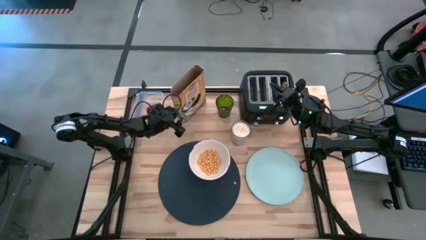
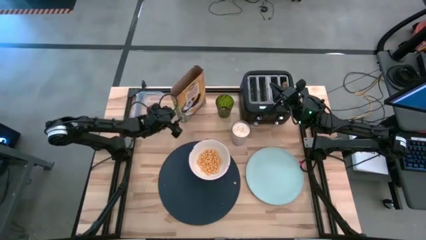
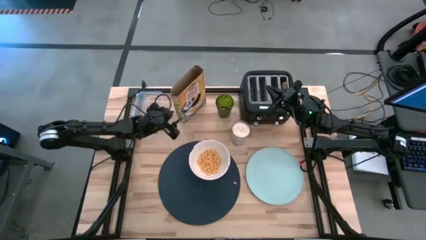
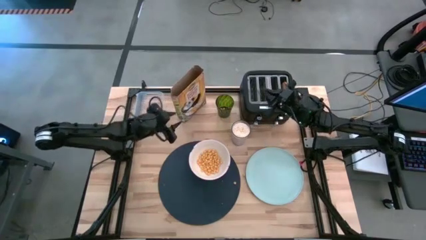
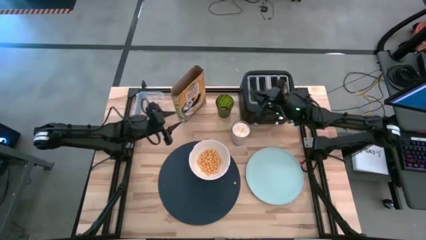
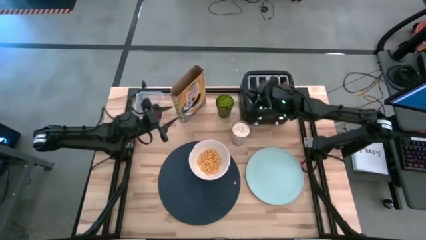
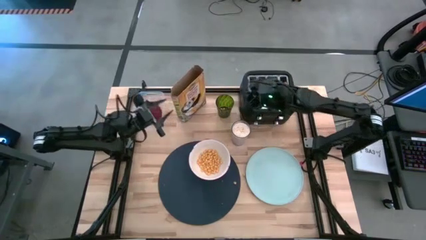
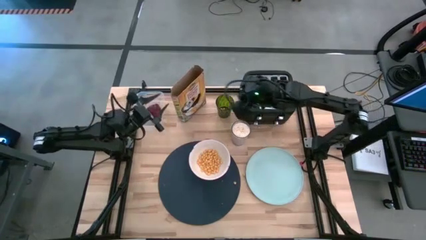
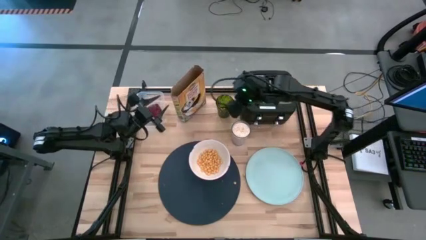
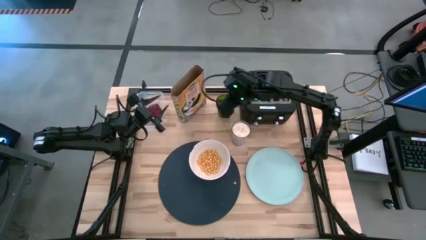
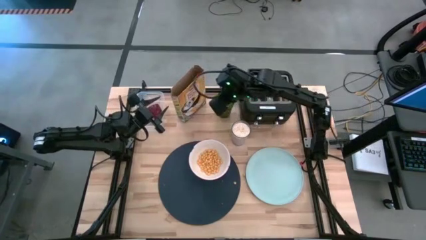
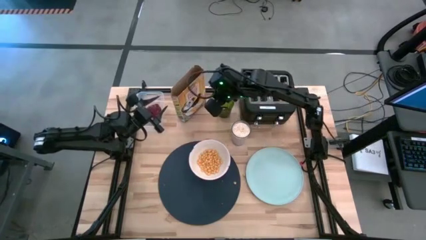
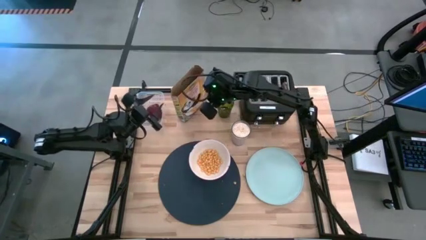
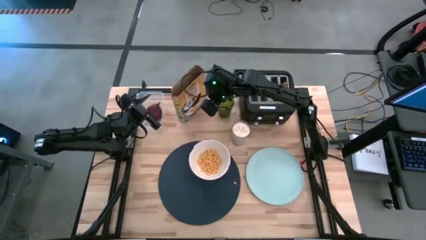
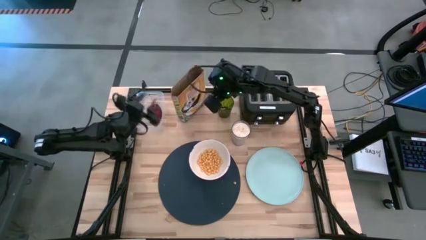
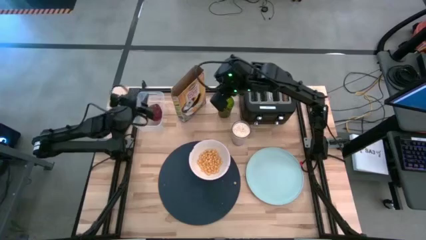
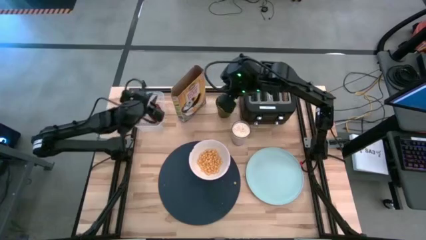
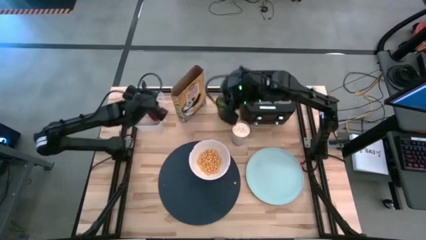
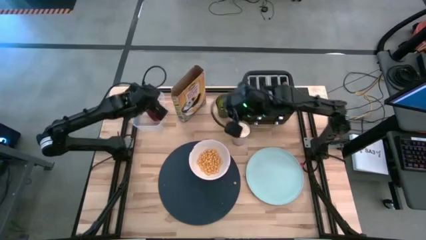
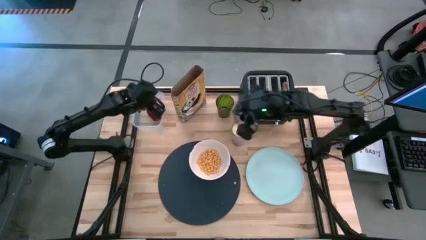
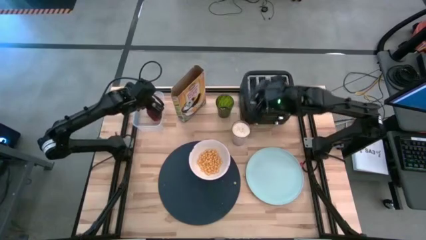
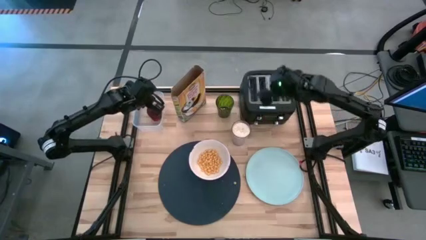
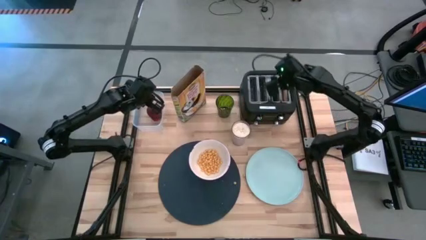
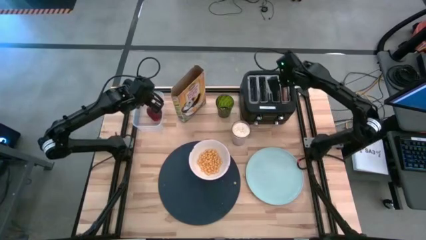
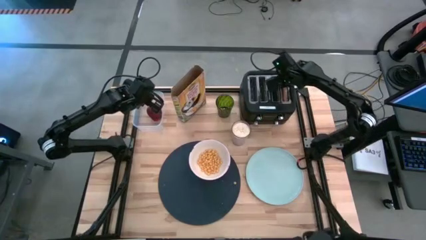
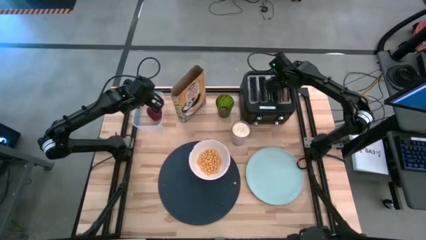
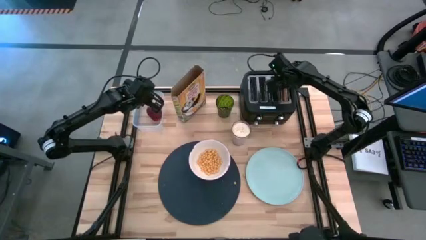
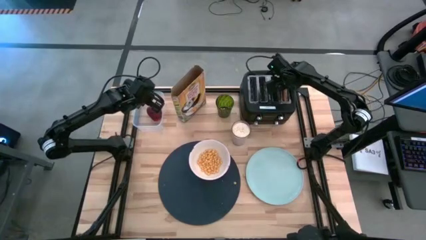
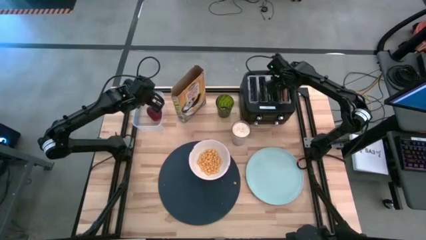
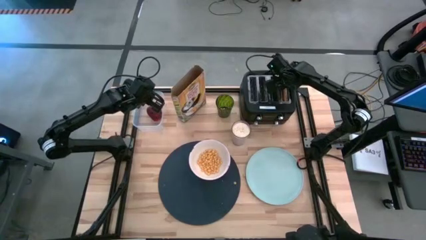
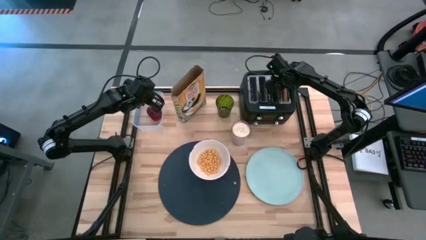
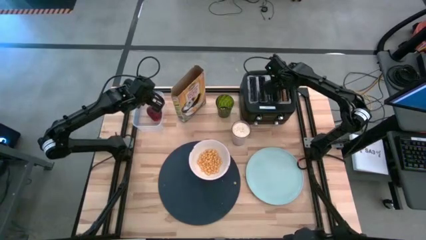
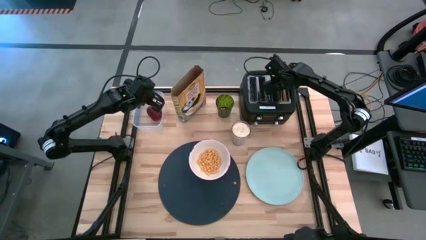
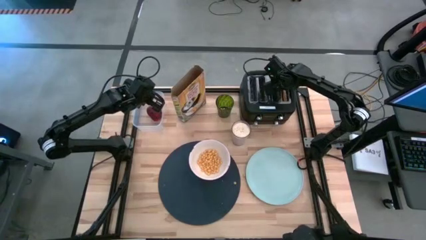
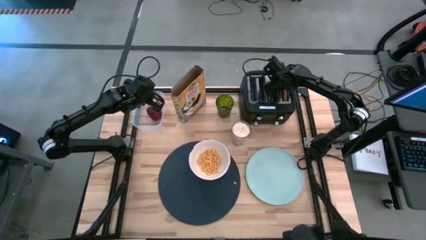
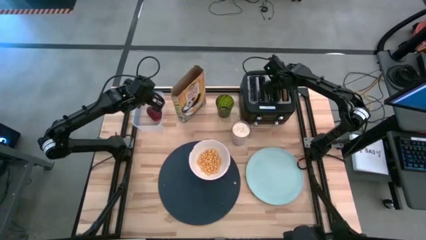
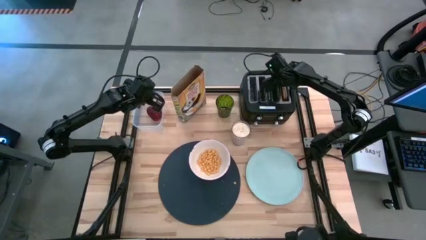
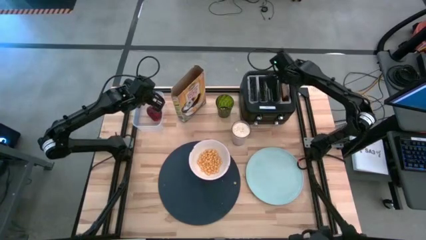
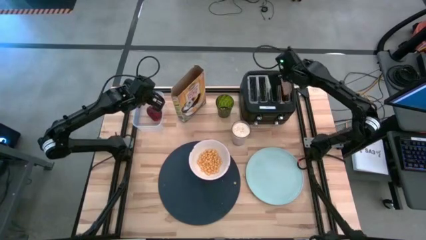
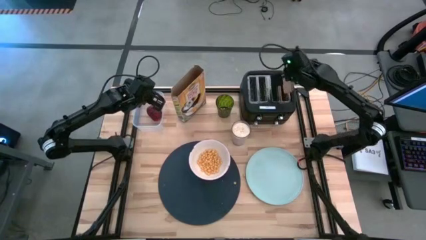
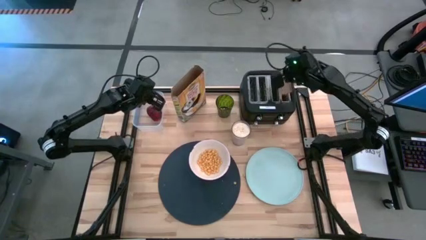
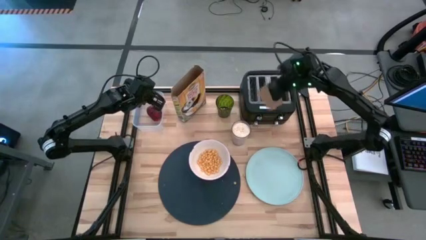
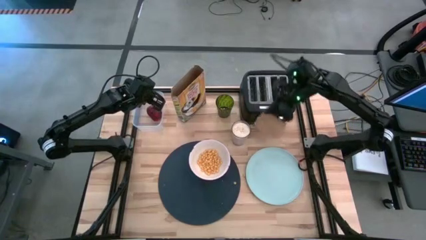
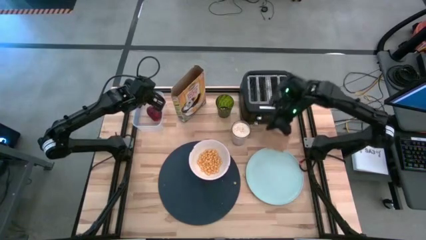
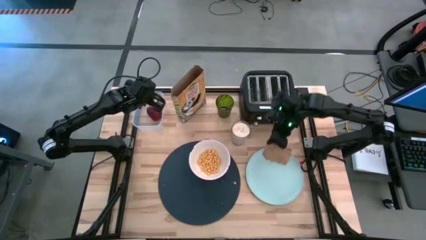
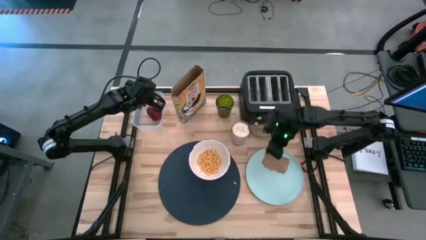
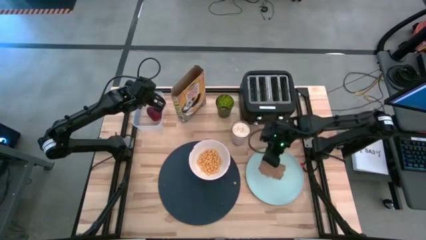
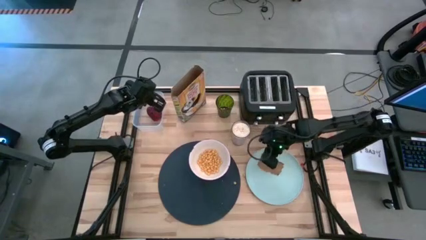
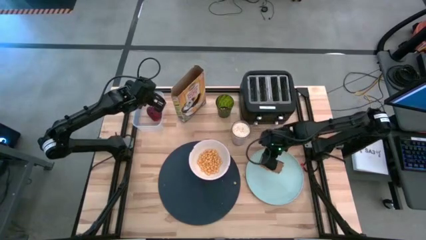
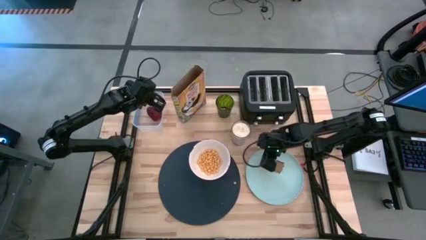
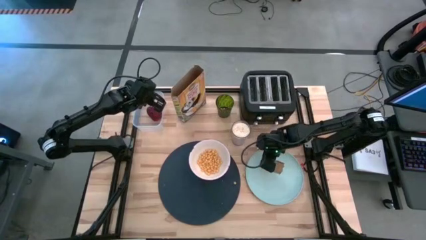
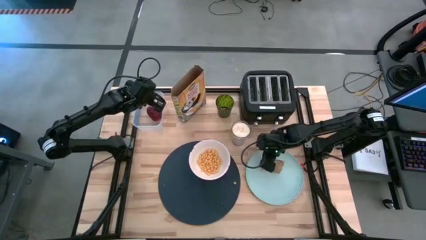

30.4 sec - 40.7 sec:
Task: Arrange a breakfast setting
Put the toasted bread from the toaster on the light blue plate
